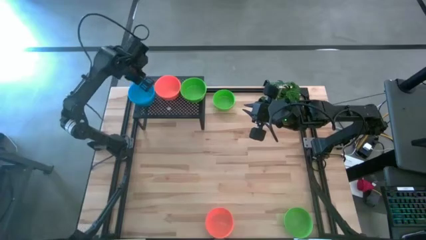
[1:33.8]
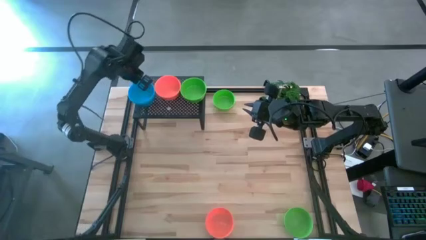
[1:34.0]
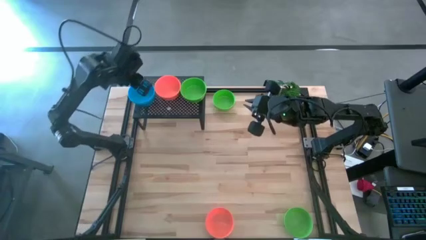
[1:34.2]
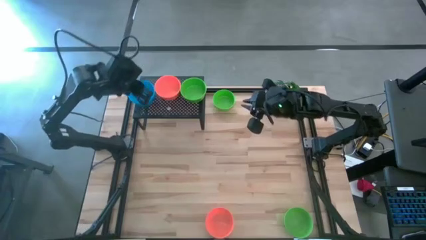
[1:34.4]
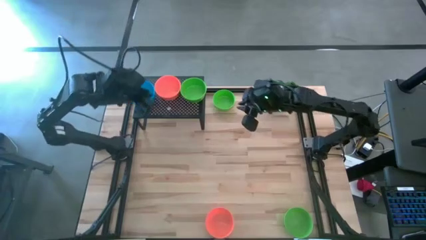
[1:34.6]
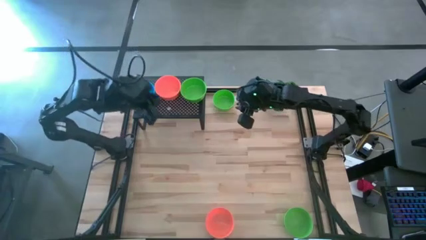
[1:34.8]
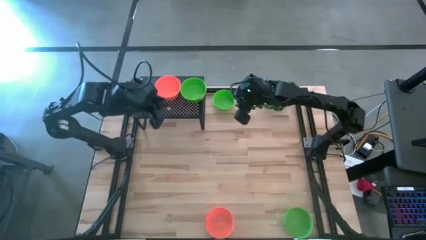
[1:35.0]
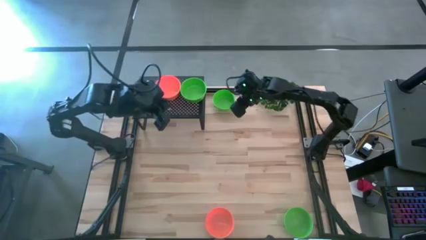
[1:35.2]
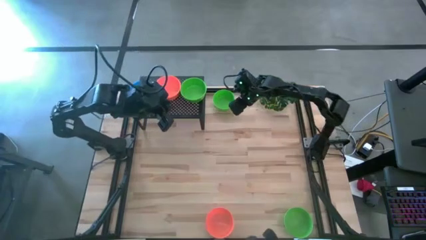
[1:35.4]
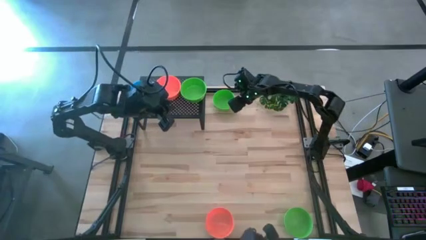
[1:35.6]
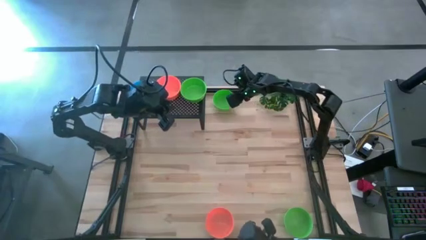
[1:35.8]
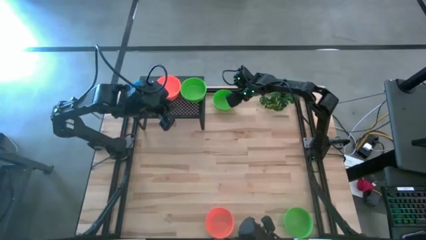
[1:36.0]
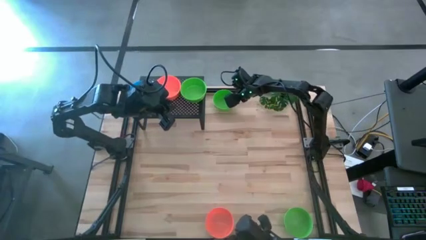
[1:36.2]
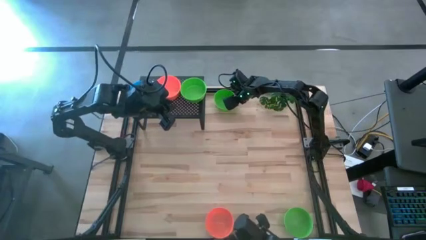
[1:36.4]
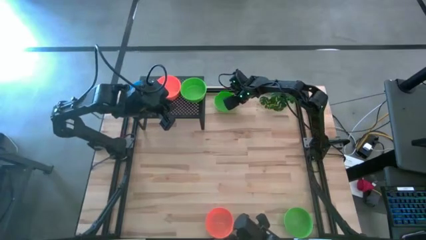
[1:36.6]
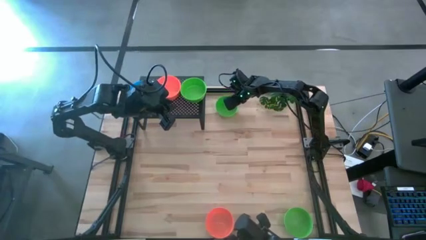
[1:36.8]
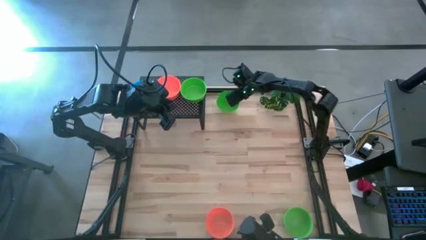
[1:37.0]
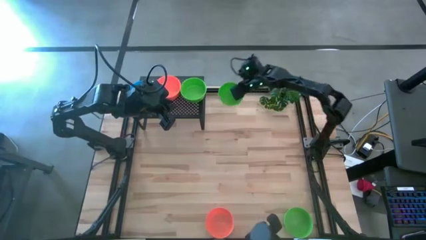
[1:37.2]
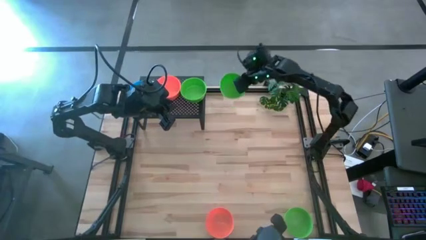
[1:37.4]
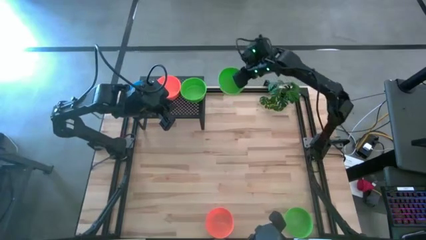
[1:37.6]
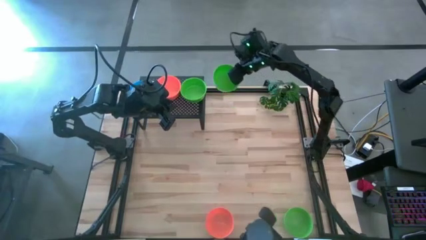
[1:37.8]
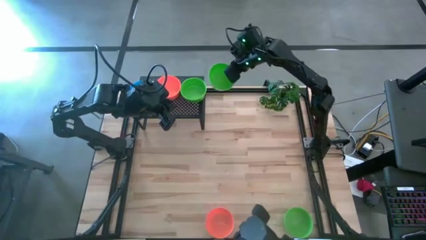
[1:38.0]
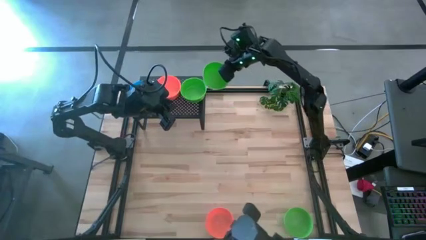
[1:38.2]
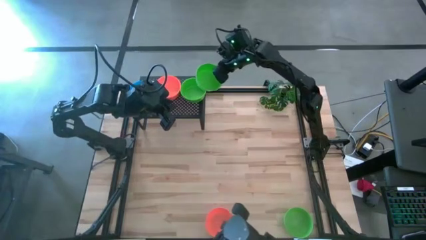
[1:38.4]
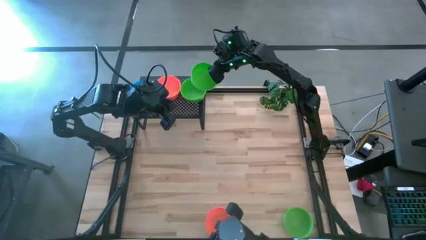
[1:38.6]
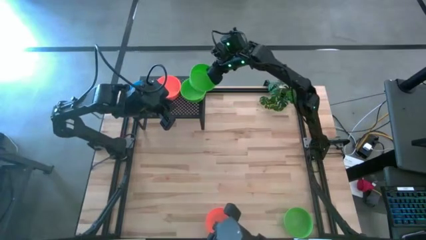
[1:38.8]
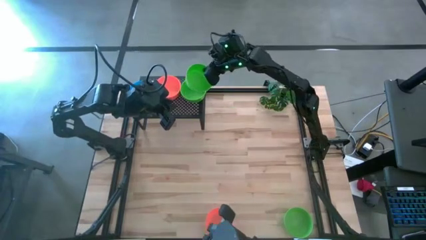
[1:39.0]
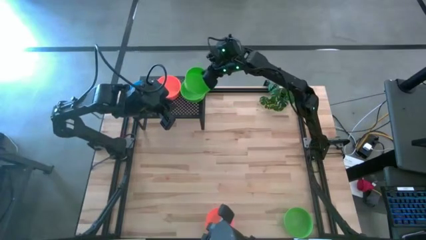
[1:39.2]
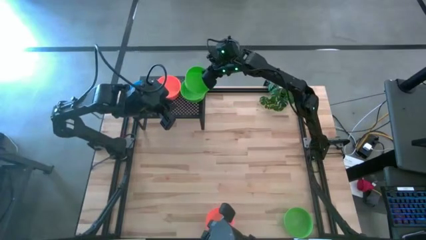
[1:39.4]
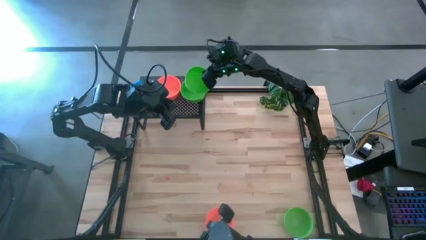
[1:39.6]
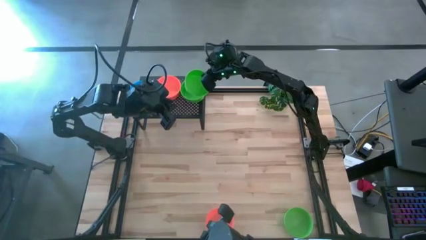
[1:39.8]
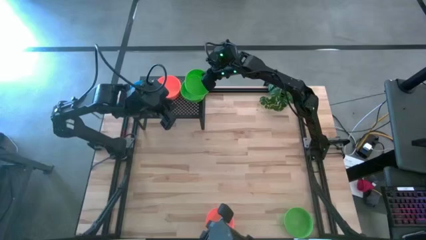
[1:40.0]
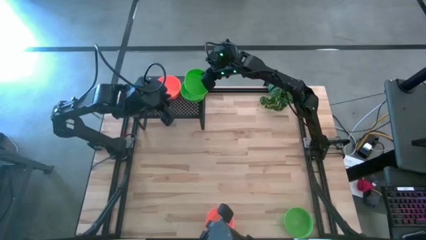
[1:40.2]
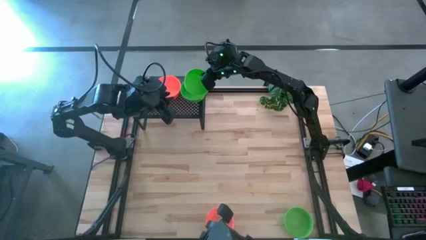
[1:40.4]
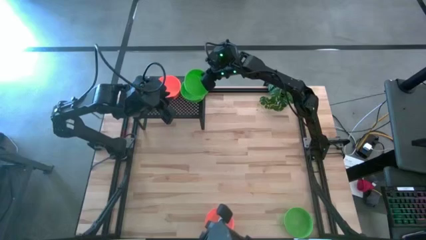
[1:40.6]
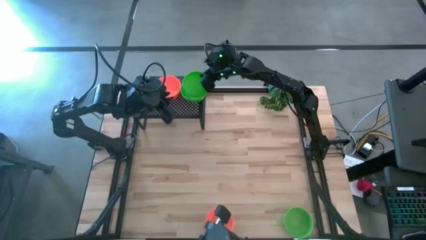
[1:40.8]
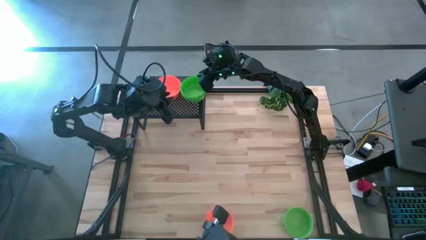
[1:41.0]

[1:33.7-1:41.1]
Task: Pick & Place Mini bowls
Stack the green bowl on top of the green bowl on the shelf

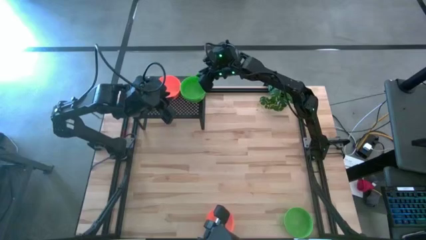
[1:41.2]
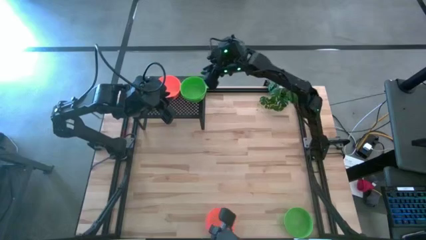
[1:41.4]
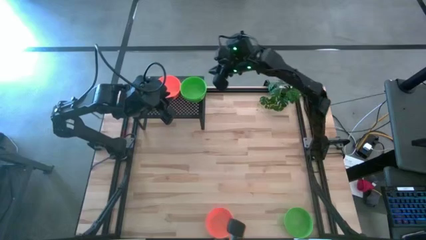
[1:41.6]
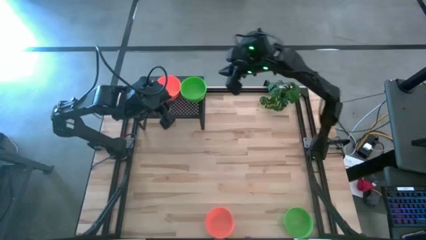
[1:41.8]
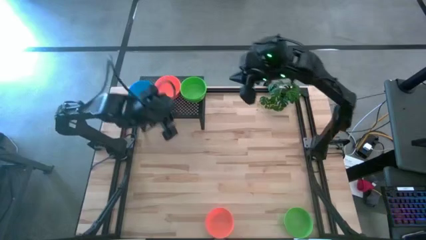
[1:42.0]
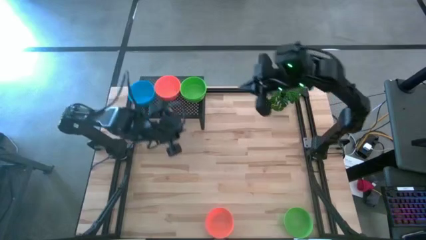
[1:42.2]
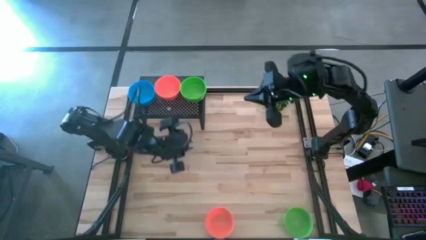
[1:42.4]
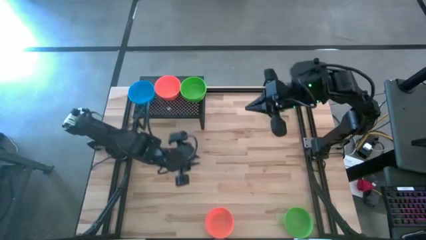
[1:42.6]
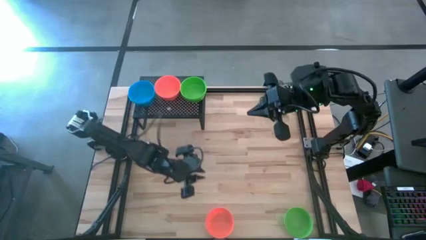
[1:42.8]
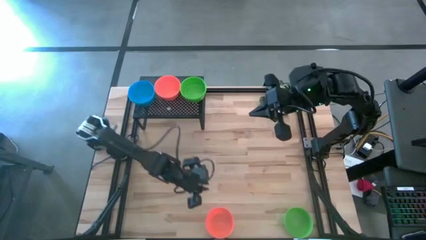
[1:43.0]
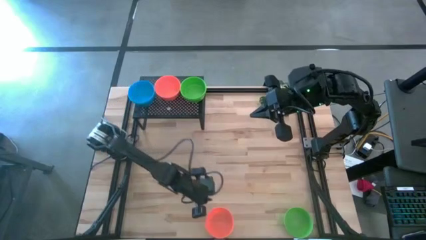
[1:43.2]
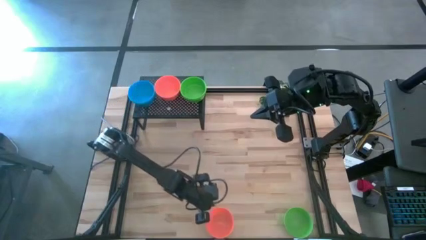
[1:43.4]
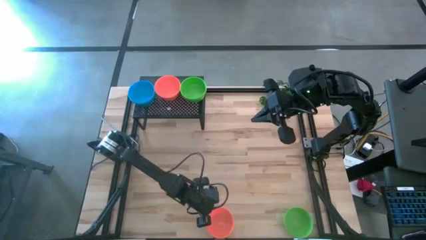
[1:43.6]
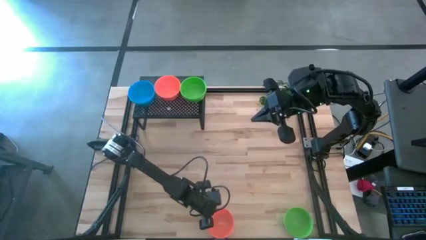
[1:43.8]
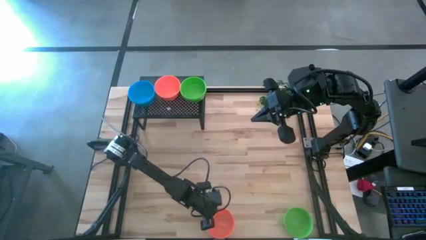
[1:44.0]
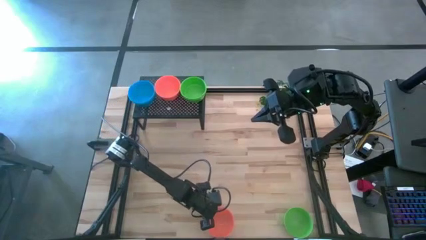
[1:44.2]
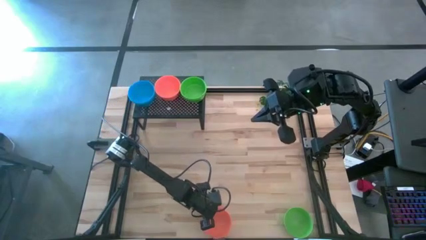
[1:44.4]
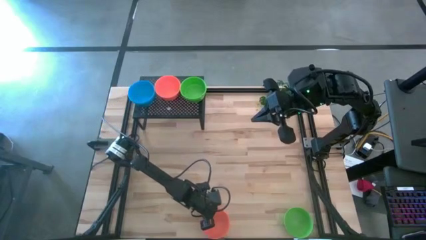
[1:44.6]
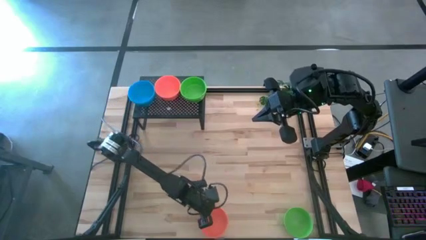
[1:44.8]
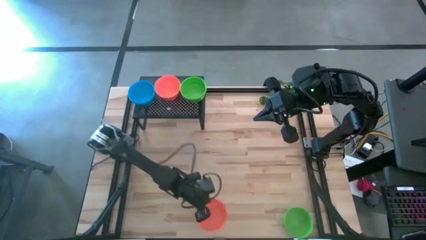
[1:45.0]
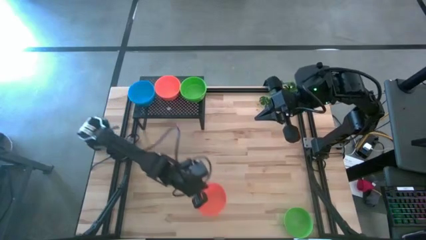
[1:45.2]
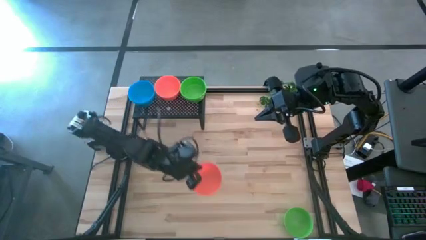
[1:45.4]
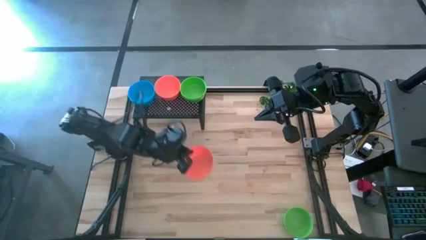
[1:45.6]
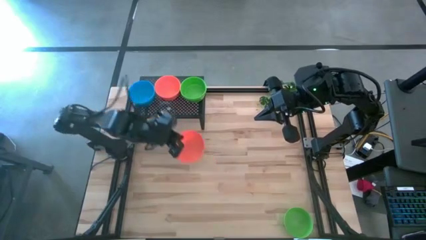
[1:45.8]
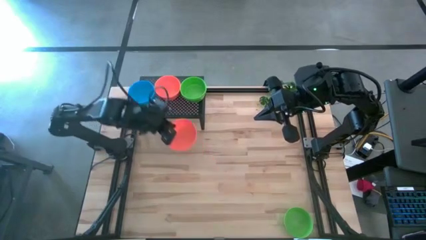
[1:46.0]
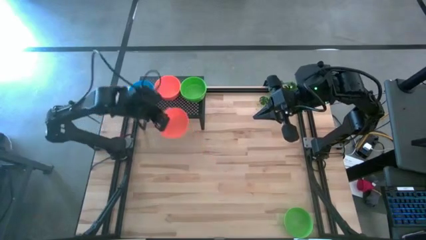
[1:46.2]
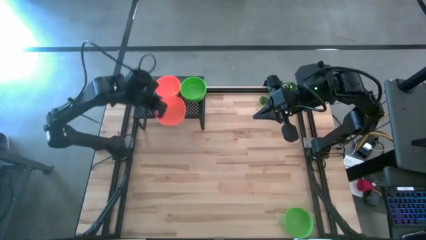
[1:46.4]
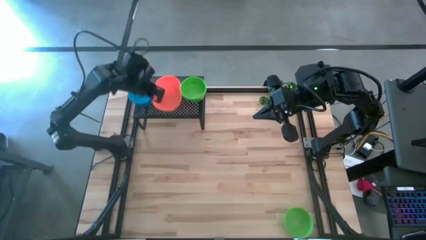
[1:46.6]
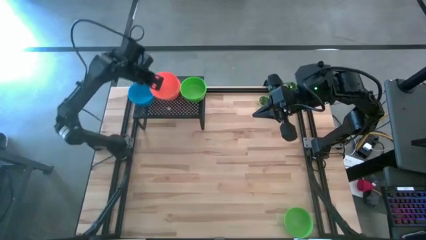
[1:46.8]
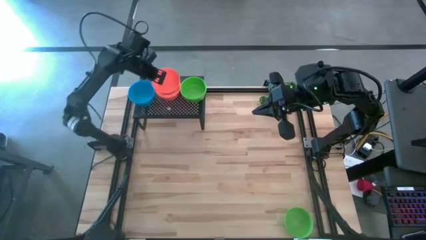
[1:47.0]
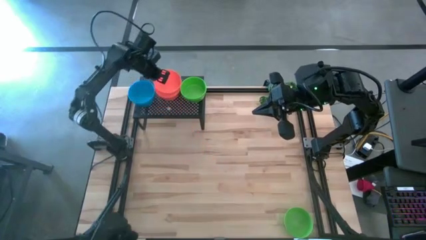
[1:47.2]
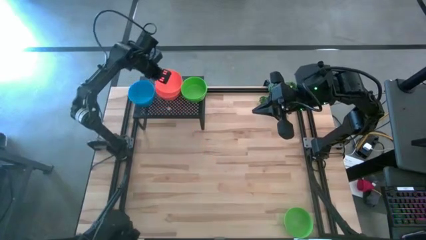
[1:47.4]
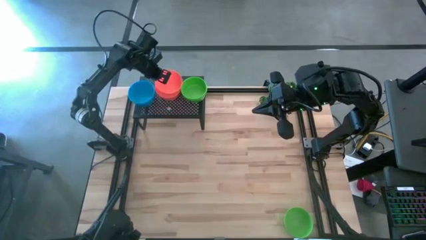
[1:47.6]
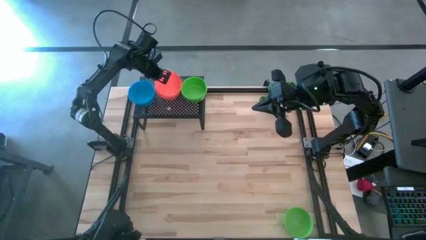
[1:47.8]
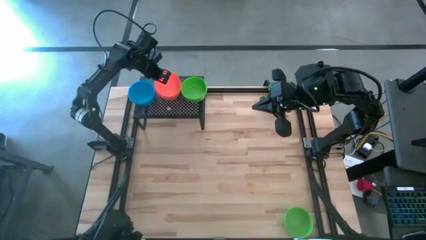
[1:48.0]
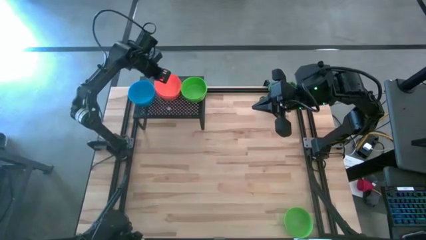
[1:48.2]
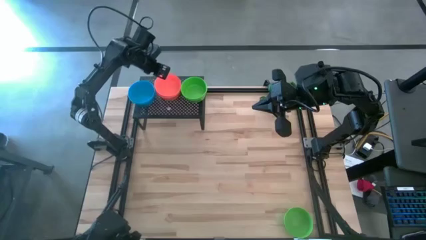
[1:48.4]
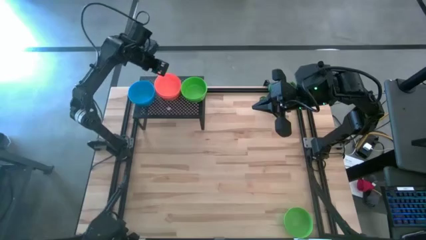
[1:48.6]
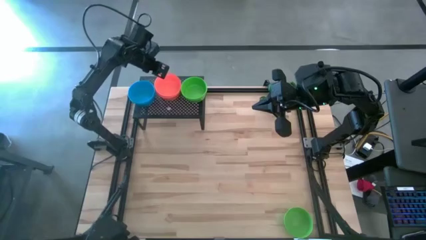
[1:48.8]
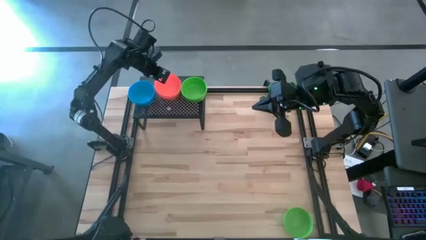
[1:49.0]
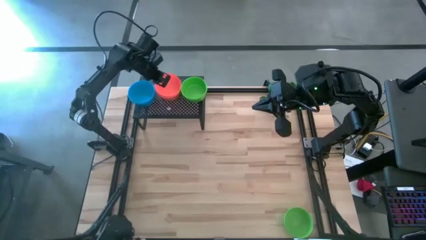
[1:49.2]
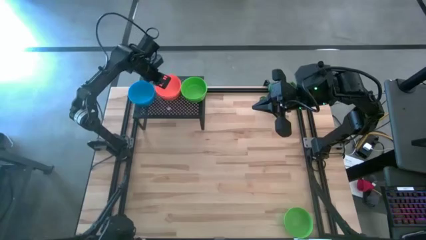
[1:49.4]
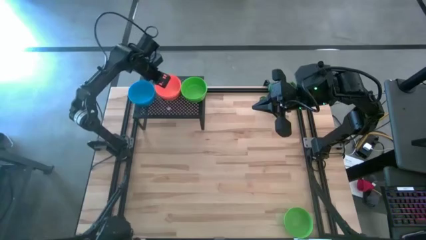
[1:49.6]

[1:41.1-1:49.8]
Stack the orange bowl on top of the orange bowl on the shelf
